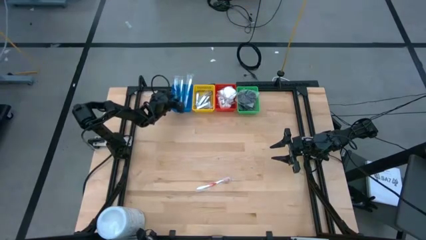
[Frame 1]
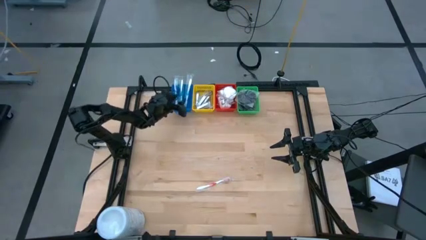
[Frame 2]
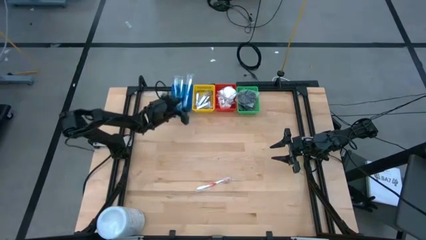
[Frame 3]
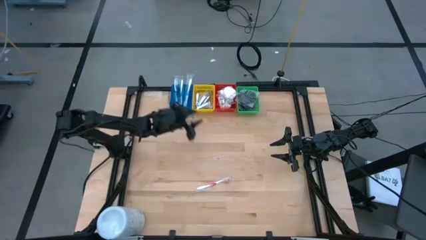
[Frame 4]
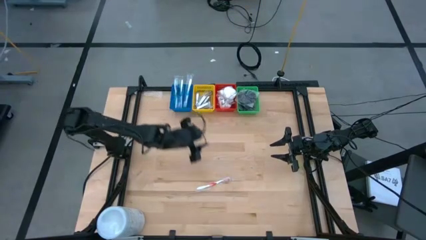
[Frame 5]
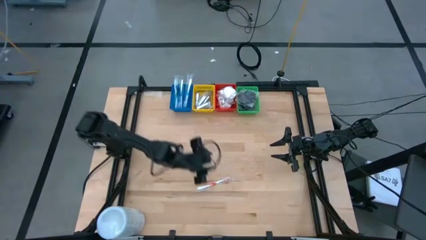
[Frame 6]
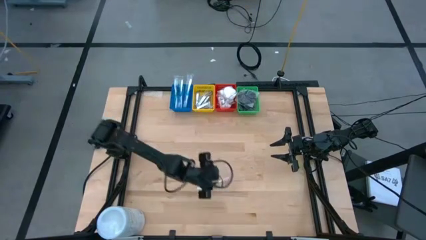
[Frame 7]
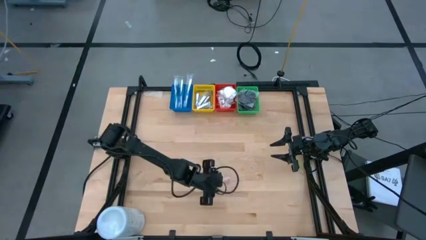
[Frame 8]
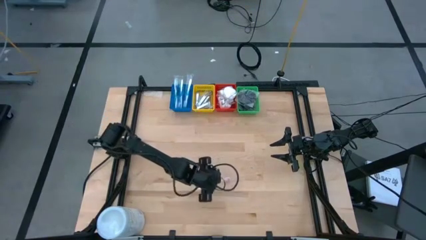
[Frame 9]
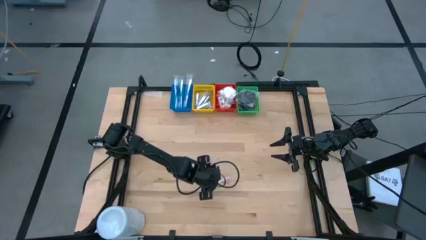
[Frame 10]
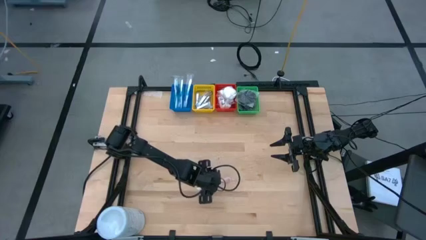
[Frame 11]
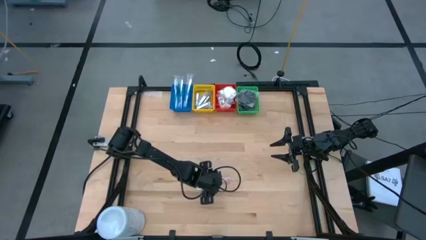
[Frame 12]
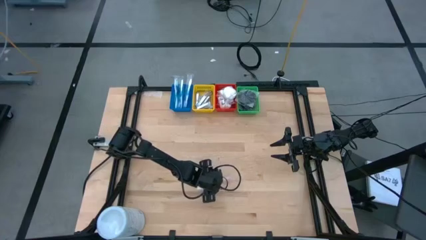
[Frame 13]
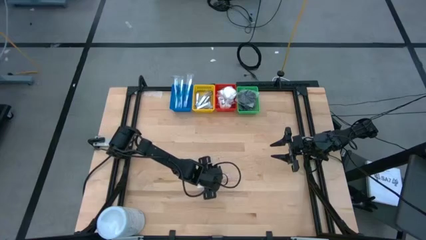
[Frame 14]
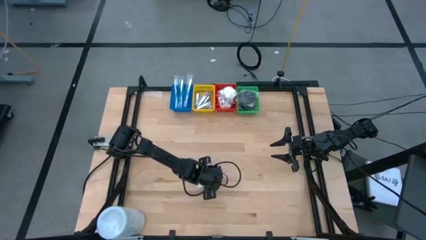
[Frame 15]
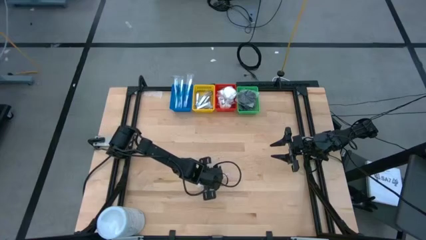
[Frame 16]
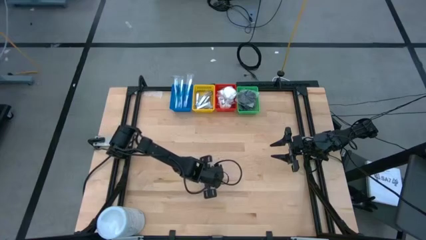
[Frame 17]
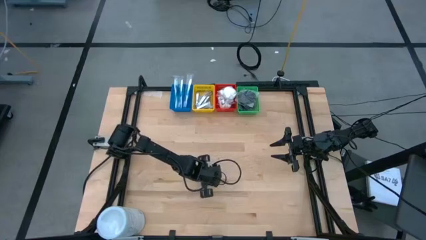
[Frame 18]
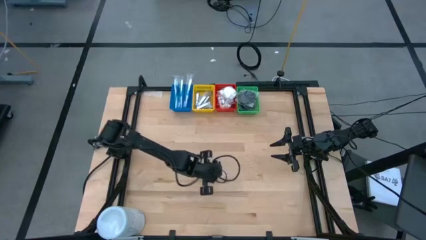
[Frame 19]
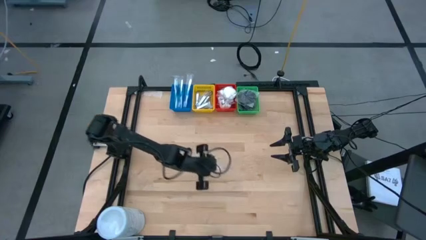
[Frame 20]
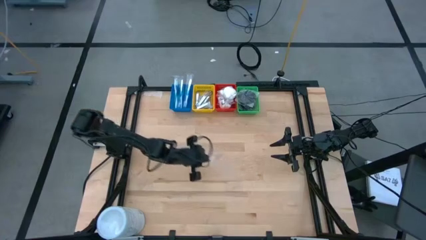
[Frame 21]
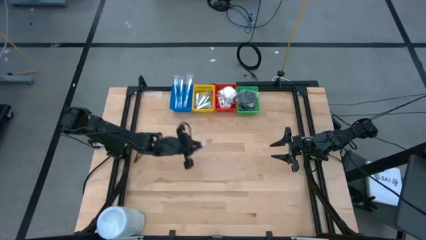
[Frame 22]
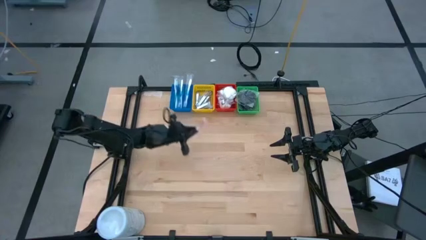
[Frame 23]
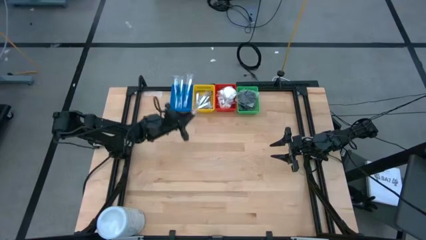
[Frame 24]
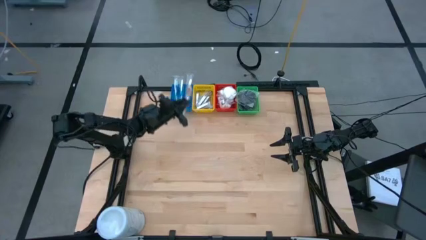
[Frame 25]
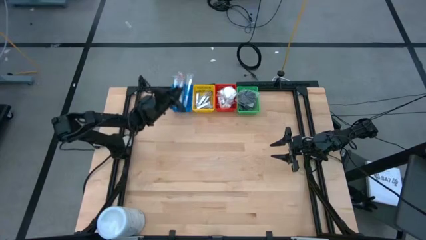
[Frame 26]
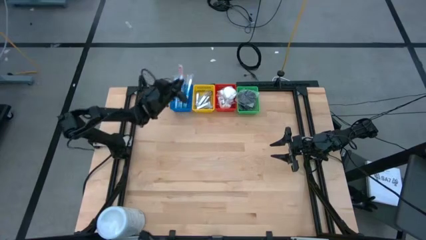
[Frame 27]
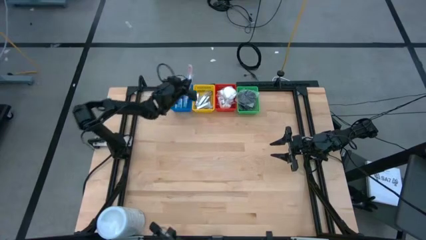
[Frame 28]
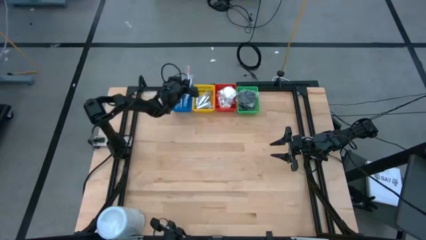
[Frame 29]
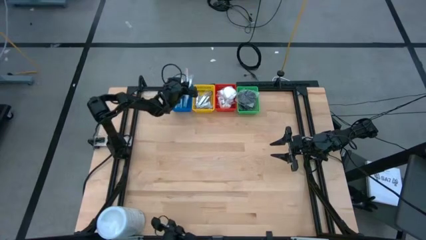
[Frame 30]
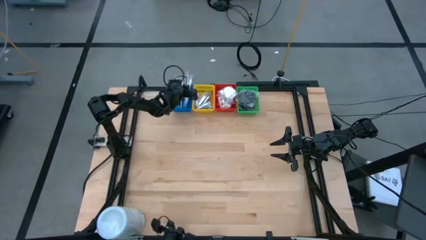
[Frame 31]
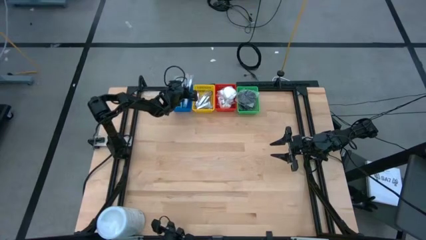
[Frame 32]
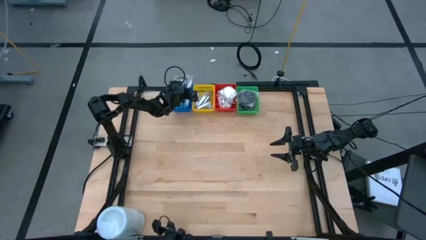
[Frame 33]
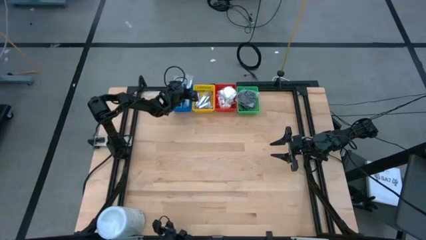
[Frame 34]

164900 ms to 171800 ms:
Task: Pick & Place Travel size toiletries
Put the red toothbrush into the blue bin

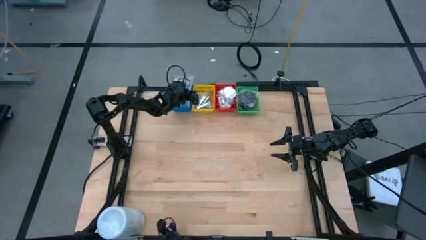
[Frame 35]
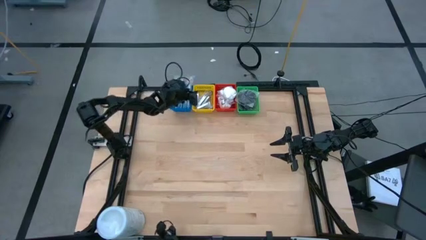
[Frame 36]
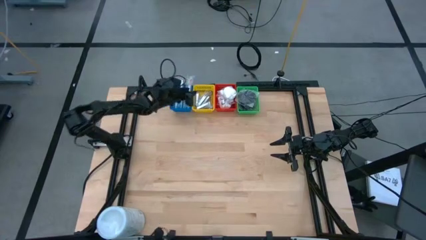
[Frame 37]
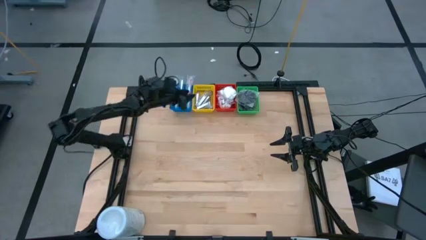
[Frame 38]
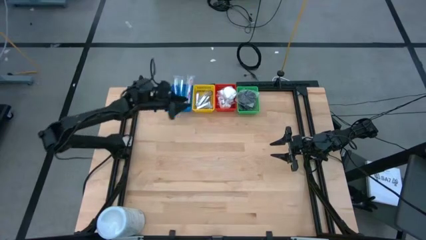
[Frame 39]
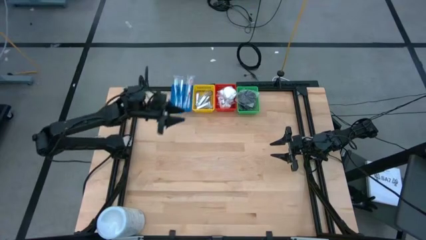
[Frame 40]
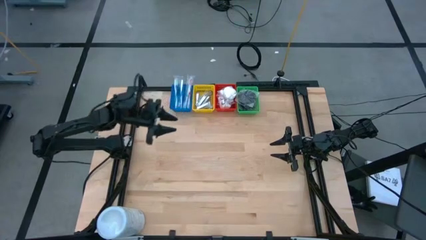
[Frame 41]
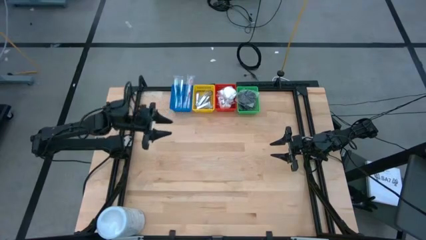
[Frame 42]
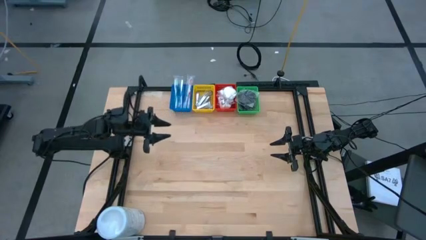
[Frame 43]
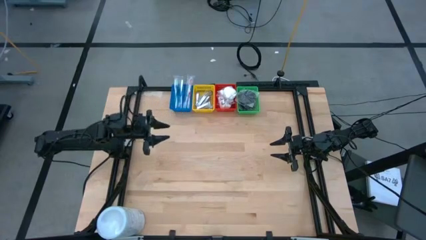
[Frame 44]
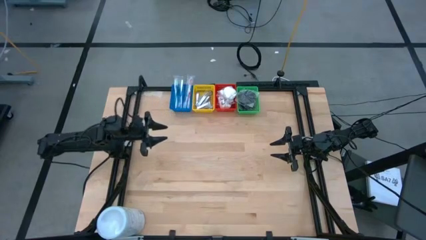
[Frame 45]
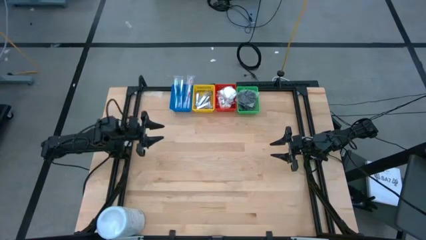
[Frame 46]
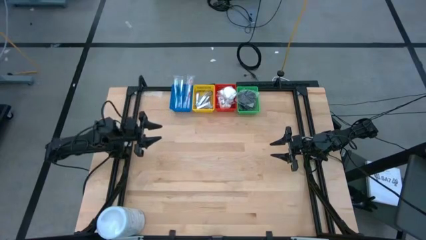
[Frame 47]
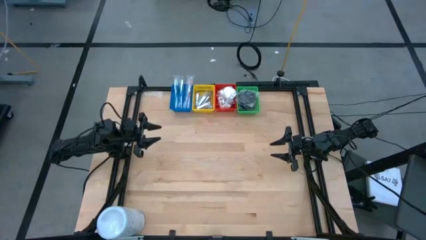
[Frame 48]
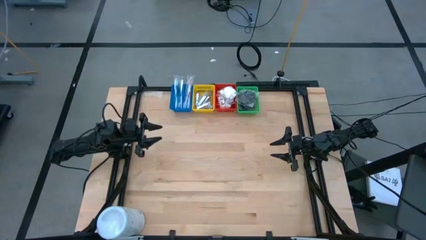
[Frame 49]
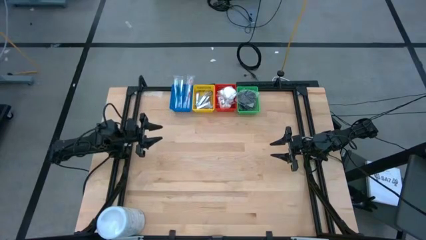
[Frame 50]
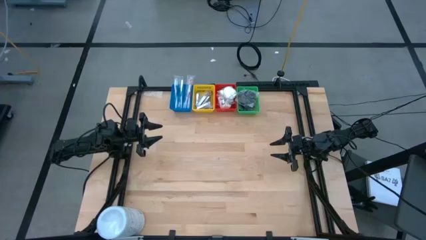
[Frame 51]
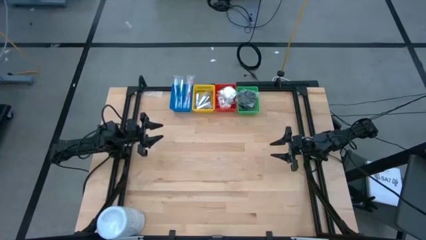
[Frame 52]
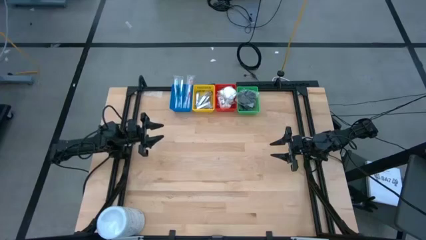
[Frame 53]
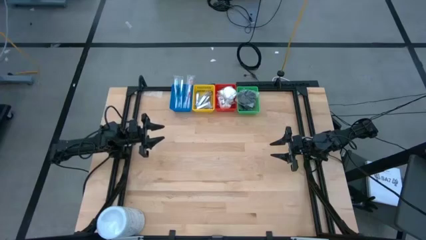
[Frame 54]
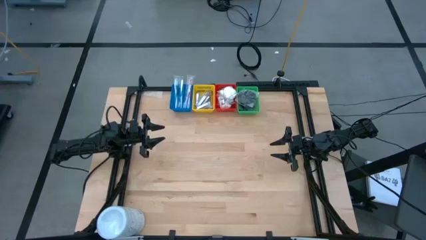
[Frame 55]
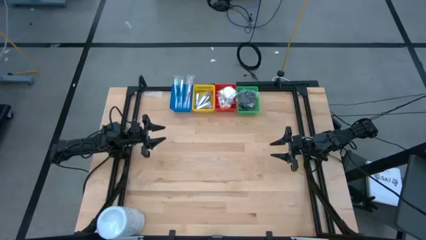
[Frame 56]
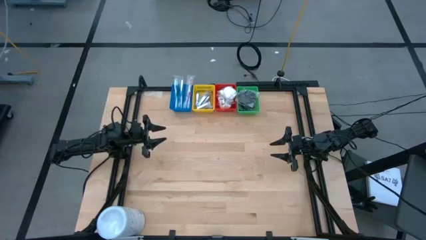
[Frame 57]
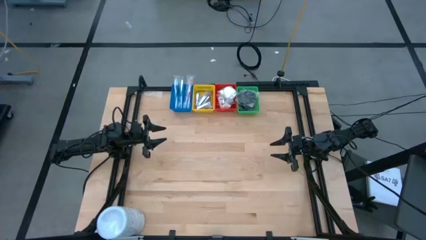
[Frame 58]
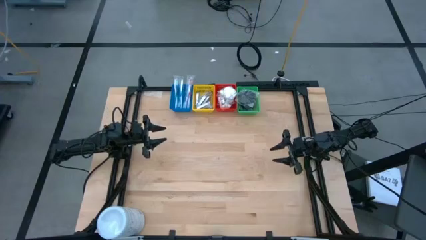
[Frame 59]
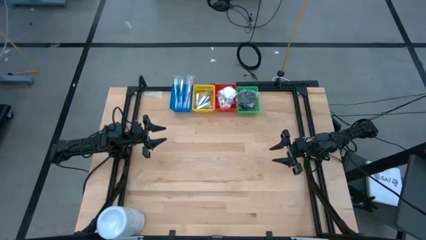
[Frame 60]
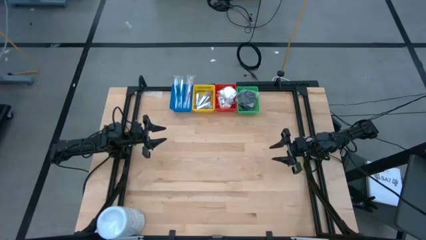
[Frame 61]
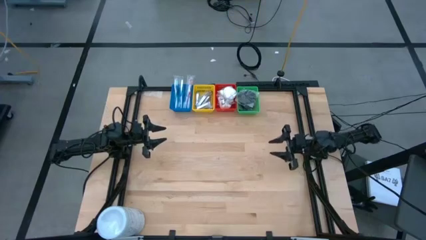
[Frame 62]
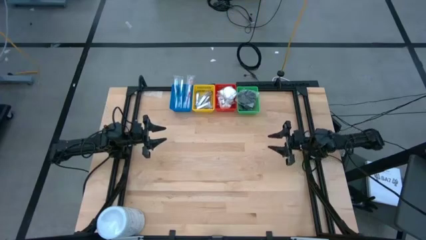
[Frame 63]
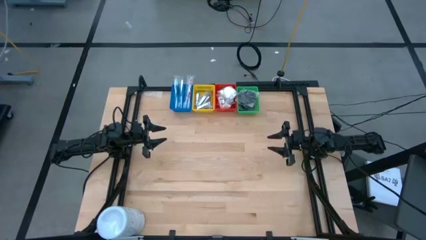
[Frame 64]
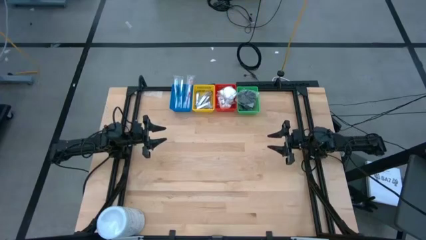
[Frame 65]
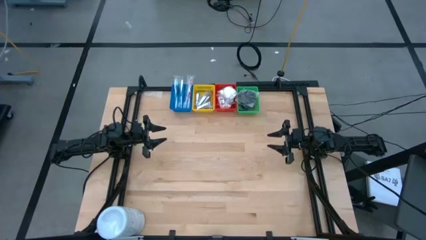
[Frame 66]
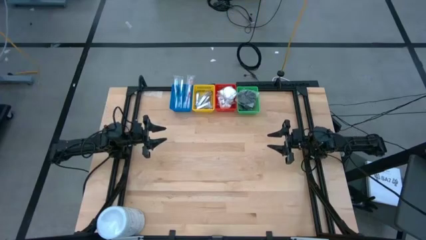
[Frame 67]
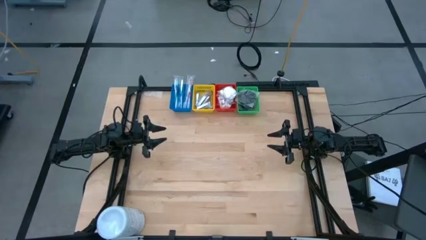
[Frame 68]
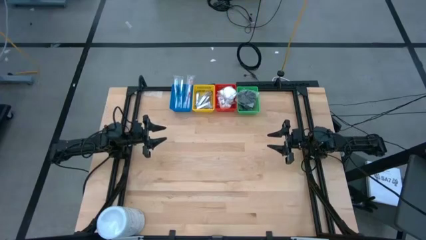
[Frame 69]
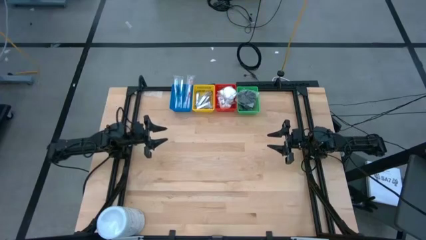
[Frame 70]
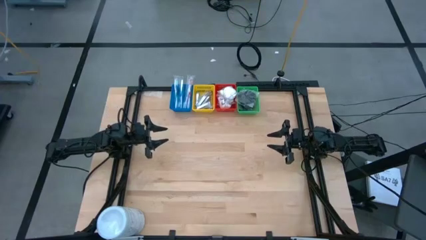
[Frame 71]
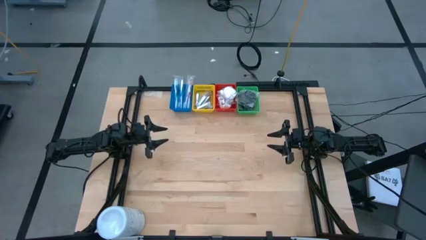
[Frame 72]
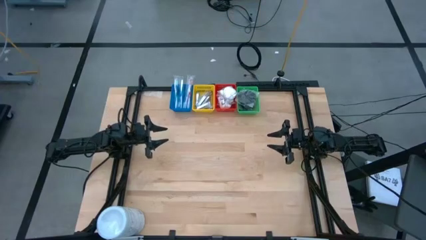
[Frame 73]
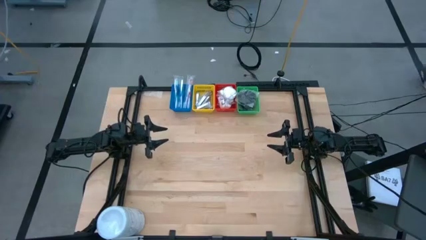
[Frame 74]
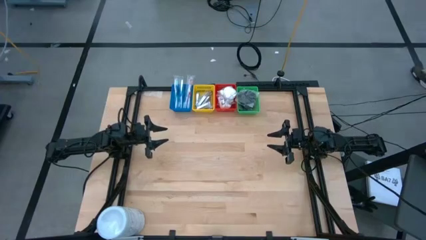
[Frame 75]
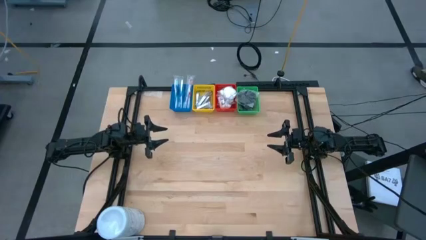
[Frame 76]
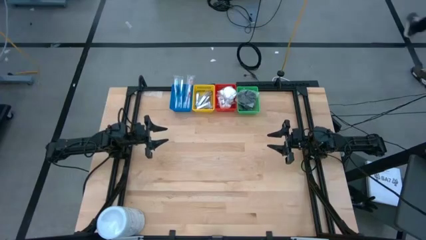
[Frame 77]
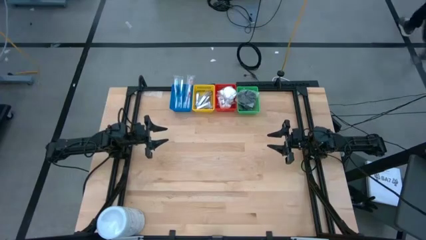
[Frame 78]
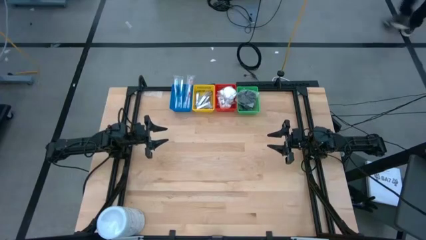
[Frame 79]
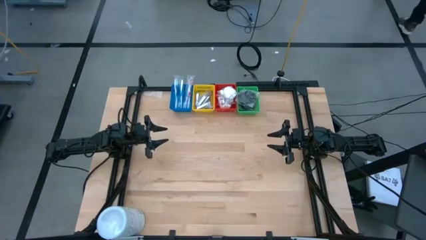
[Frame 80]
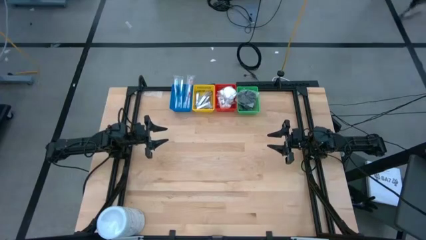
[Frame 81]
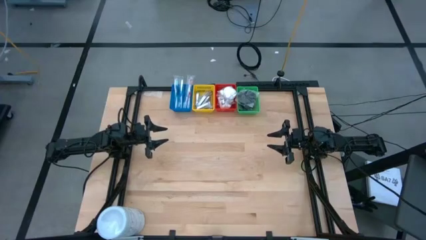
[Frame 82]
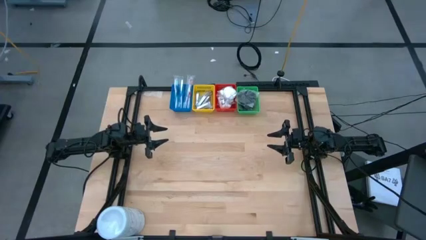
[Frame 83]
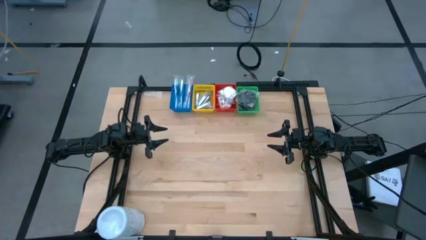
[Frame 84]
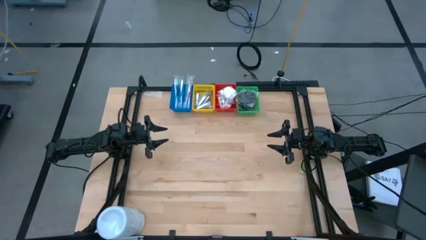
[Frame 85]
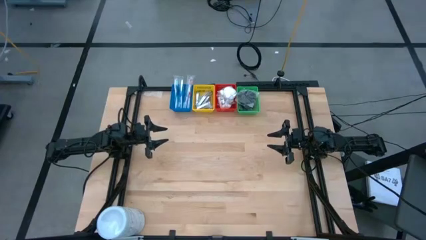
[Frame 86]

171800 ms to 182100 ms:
Return to home position
